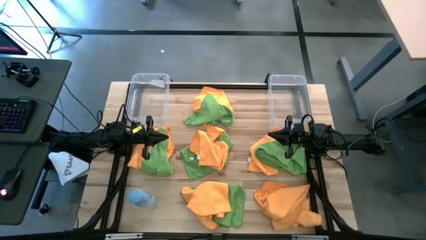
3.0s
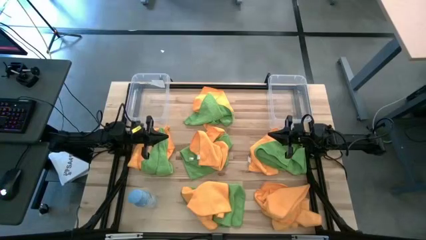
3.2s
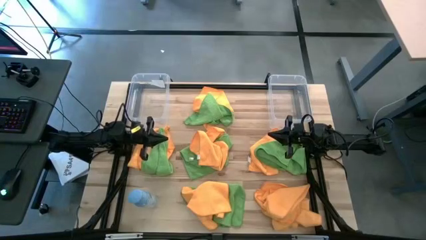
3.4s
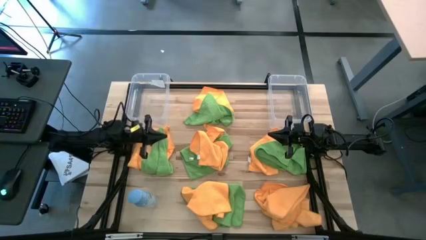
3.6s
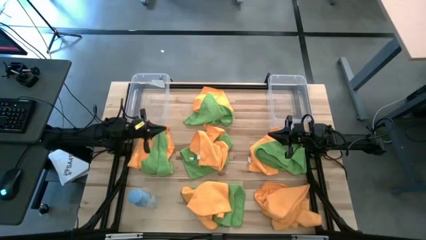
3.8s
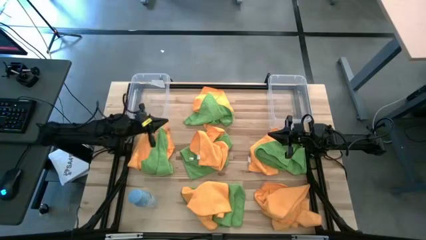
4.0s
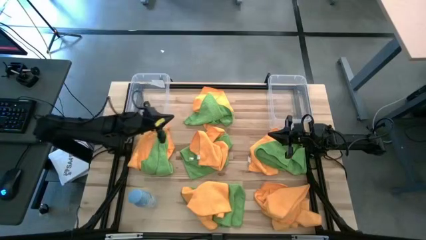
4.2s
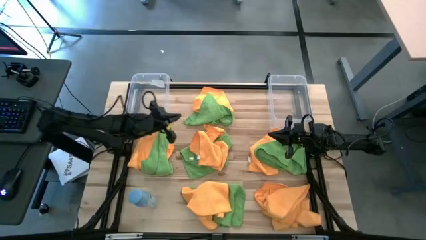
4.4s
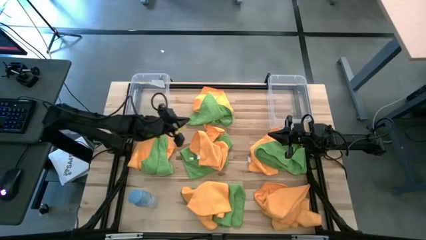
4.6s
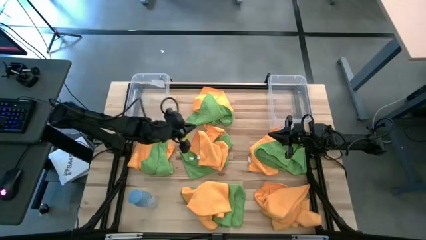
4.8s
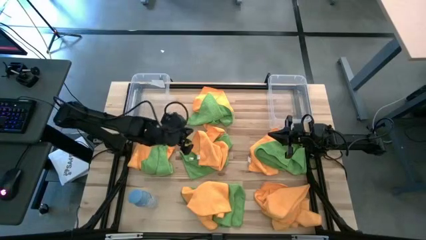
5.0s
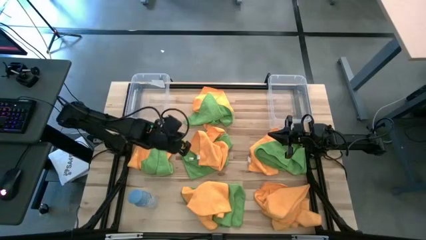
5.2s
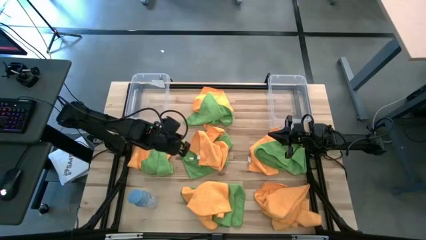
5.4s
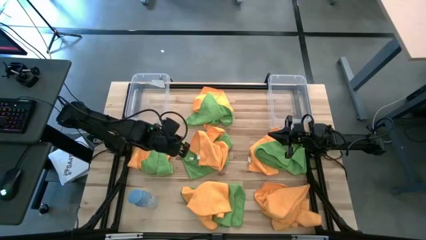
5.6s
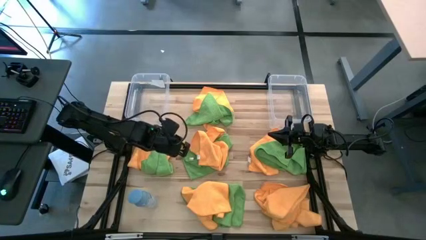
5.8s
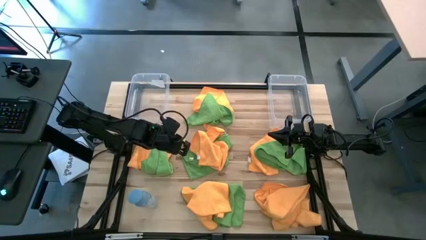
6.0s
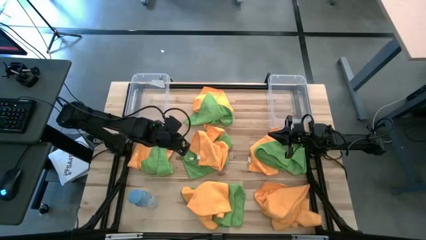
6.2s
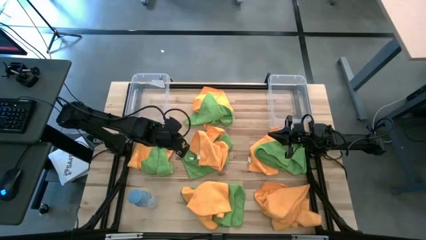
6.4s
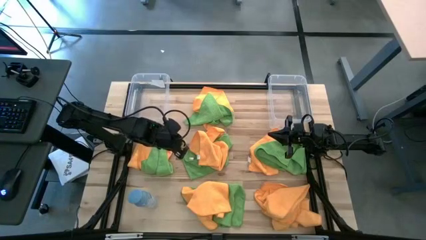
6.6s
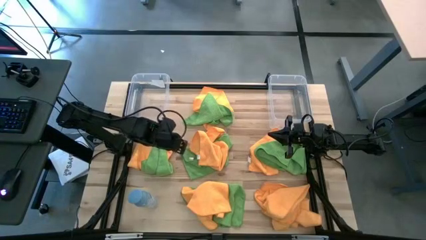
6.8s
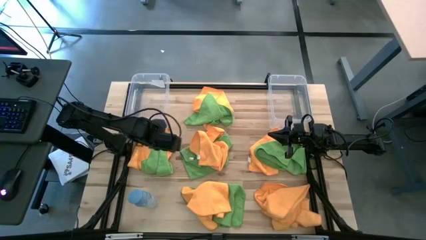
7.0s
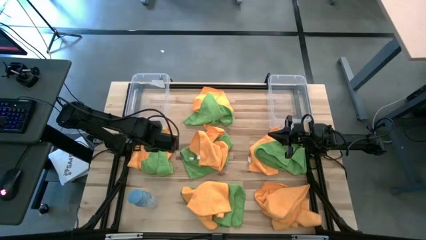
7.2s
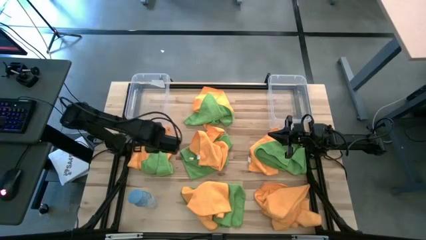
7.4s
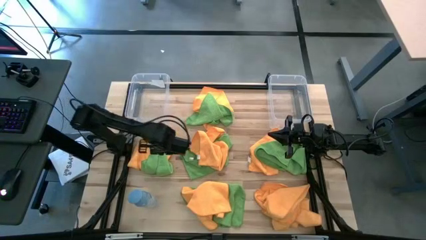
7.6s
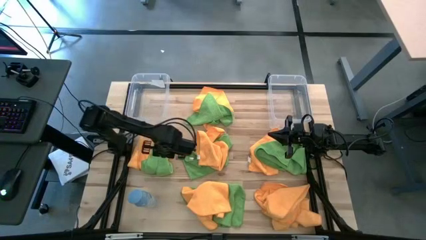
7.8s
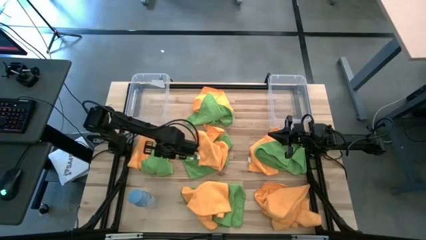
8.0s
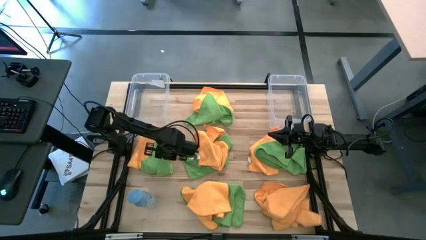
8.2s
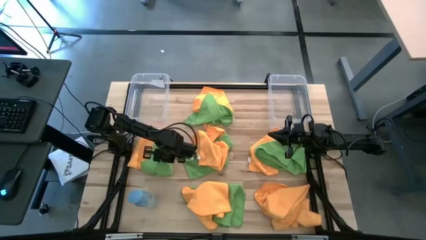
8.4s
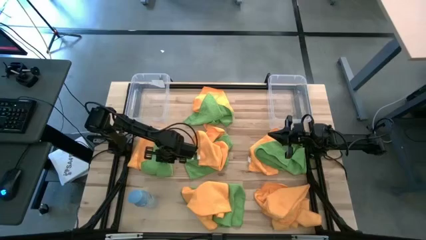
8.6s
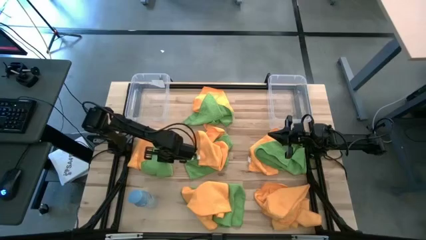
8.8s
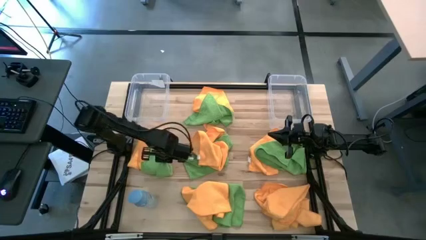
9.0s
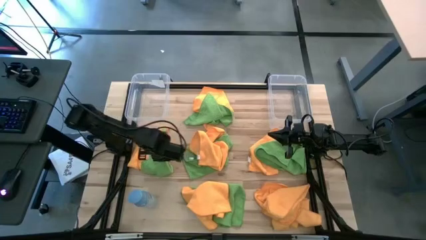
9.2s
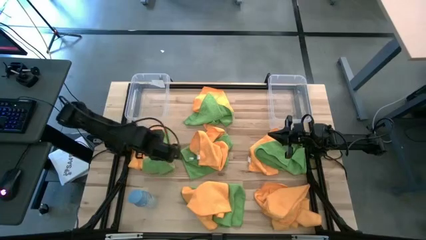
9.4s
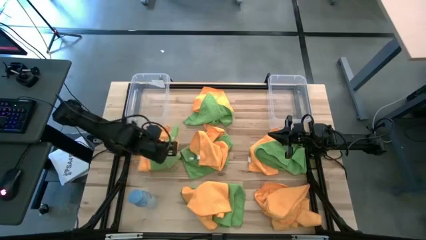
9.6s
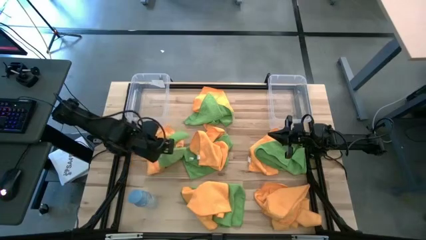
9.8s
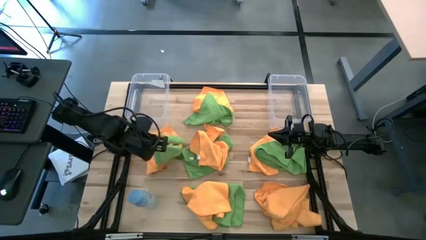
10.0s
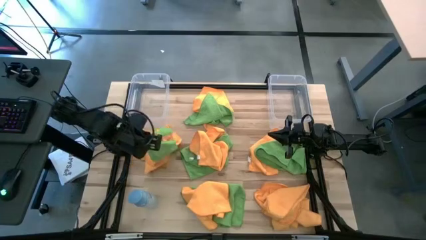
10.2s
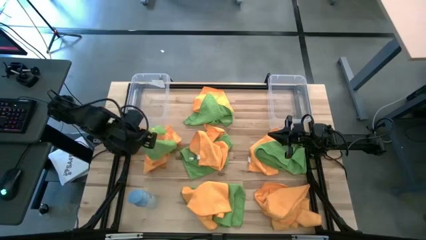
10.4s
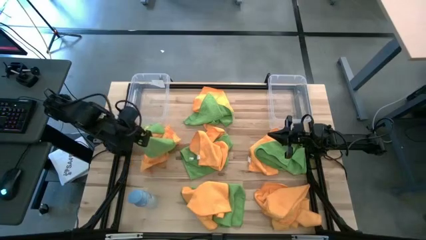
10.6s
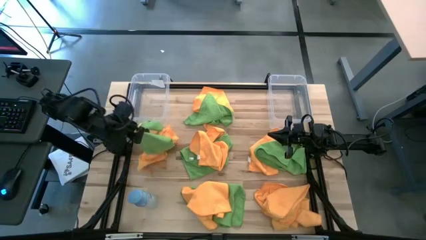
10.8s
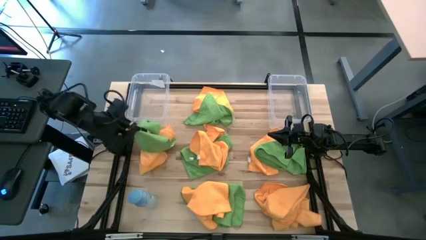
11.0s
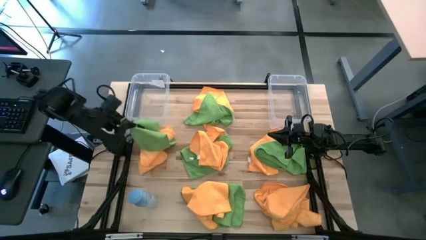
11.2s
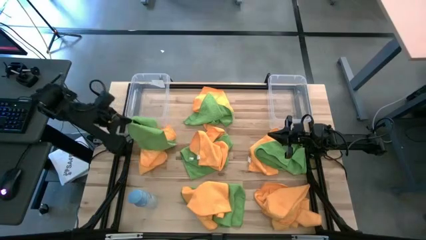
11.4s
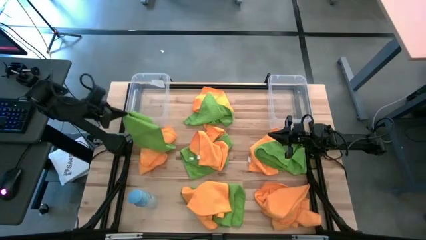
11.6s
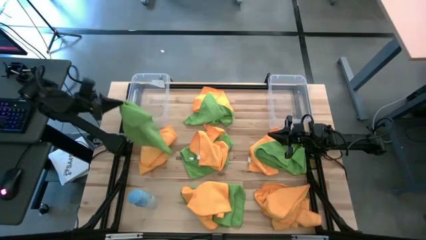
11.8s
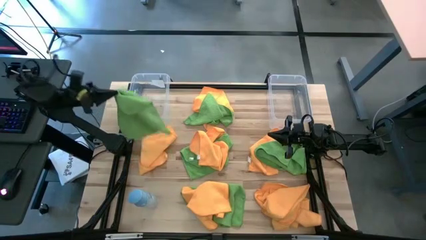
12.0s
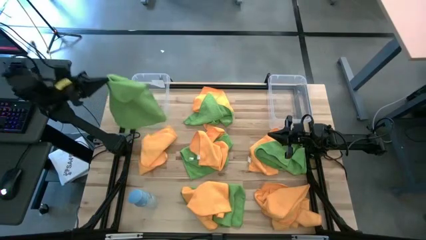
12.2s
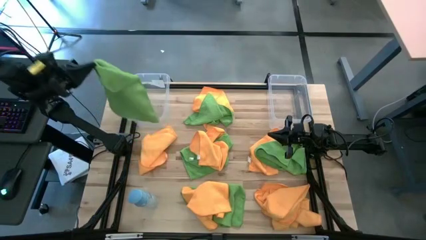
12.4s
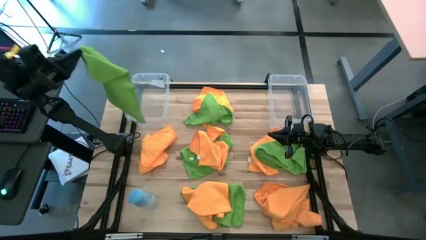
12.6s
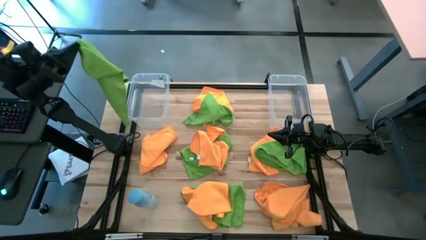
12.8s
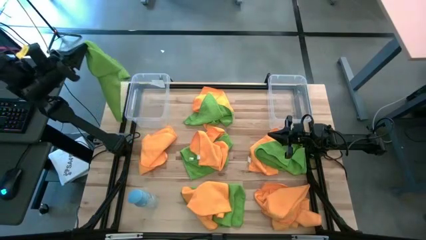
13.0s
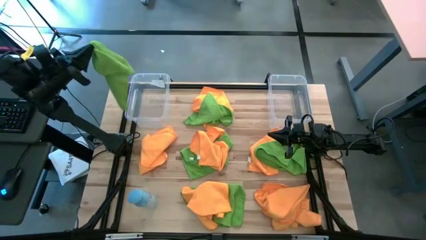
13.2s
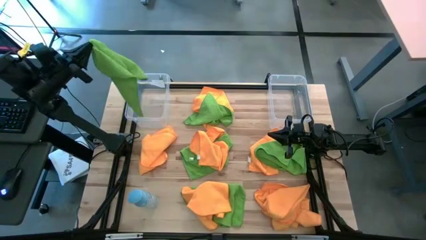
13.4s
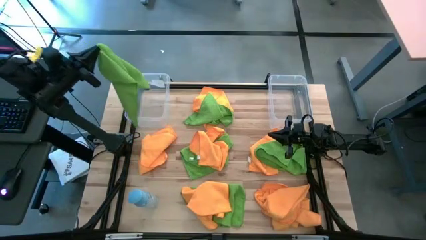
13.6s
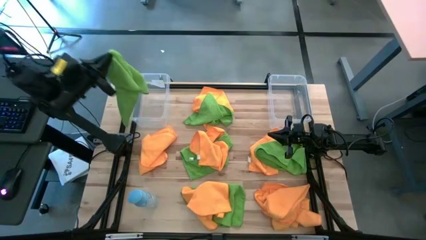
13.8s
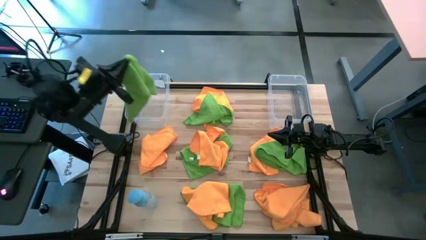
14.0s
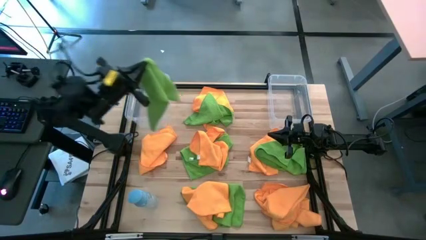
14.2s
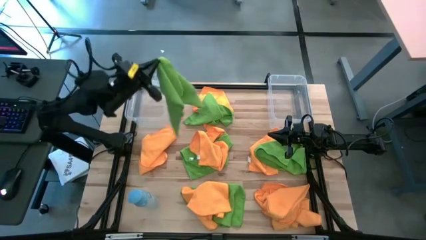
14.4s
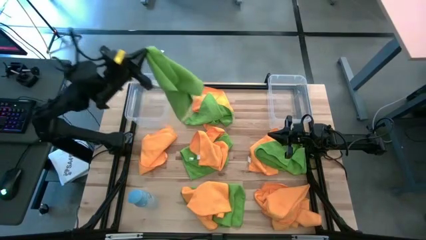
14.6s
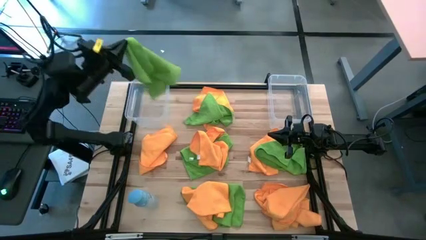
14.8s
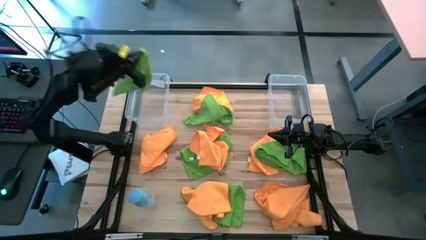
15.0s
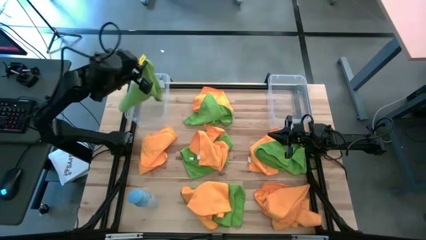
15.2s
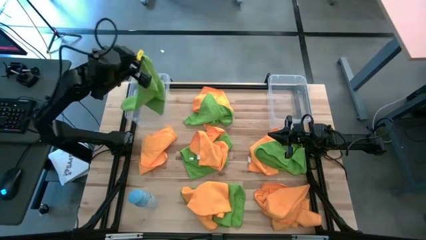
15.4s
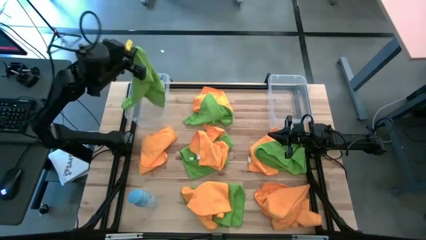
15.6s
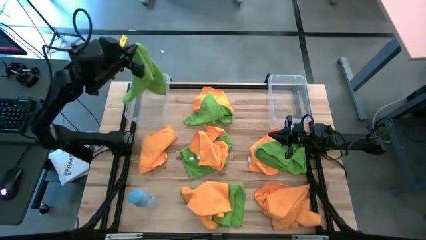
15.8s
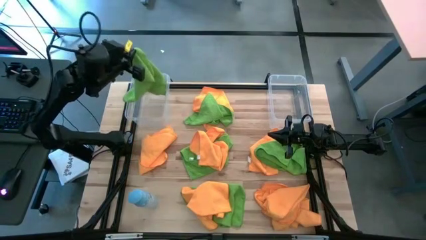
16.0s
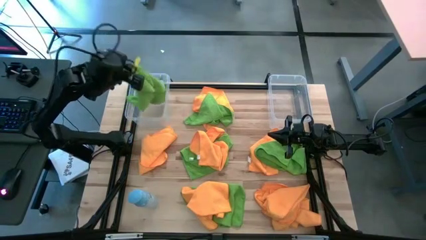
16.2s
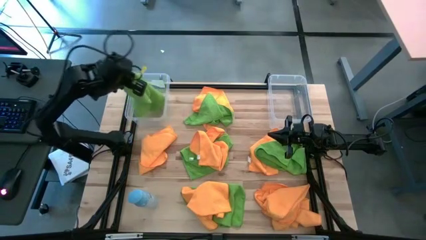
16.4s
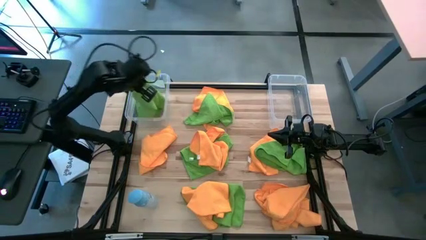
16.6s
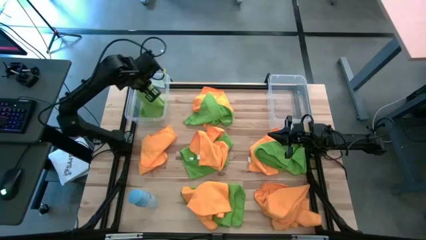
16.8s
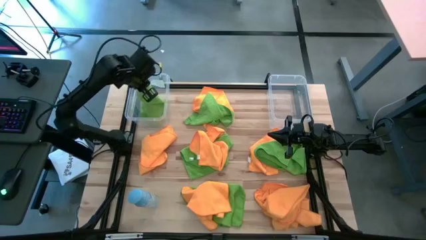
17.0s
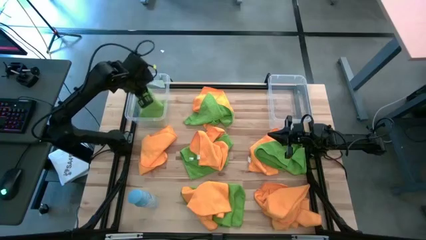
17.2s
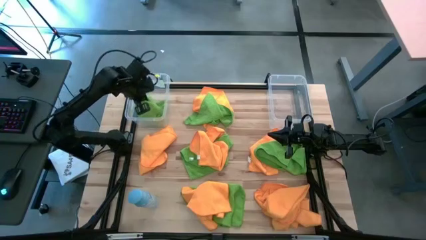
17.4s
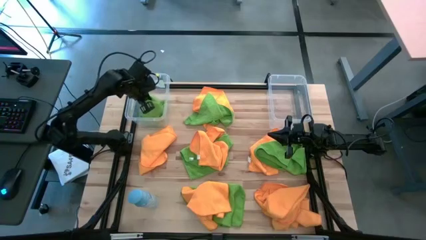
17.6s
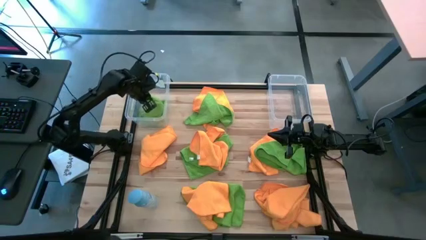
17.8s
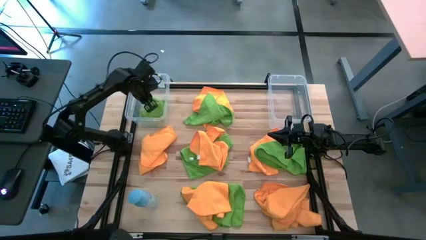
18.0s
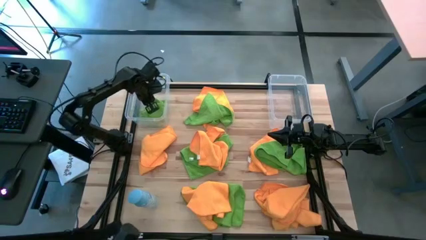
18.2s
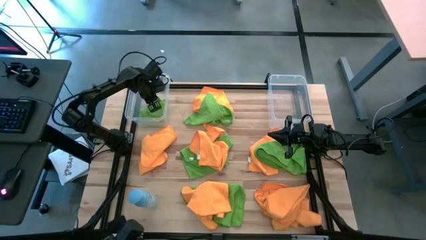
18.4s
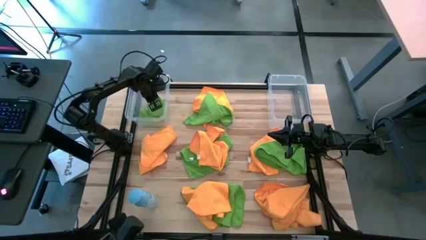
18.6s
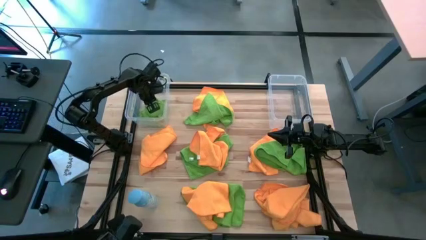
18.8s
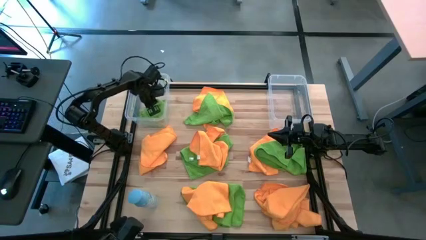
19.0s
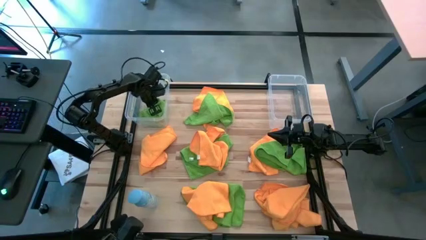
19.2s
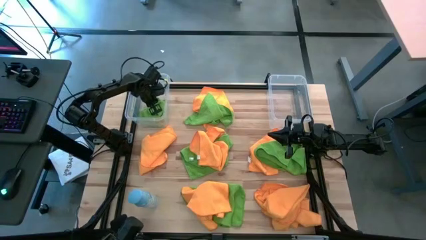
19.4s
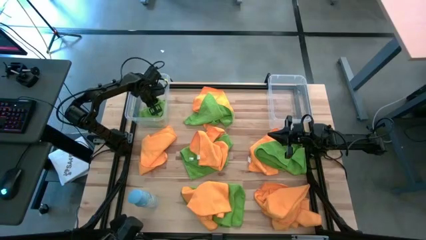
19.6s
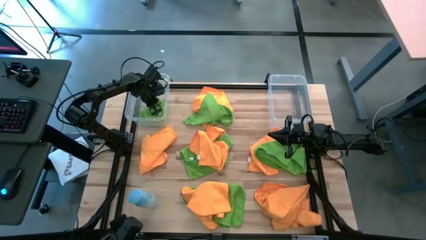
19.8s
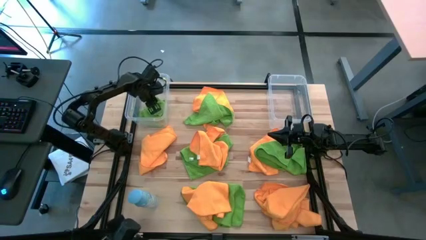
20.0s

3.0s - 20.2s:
Task: Sort microfiber towel by color & place in baskets
Put the green microfiber towel into the left transparent bin
